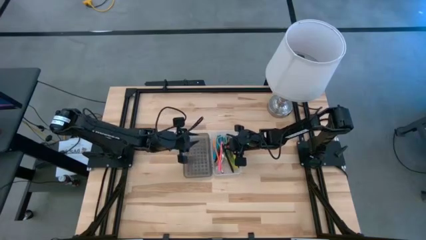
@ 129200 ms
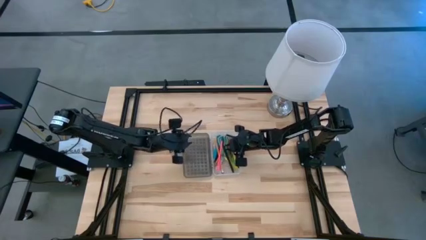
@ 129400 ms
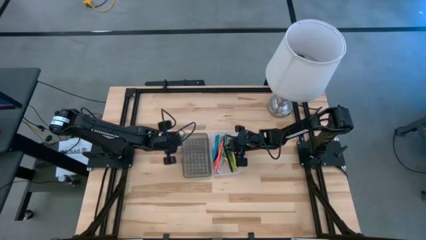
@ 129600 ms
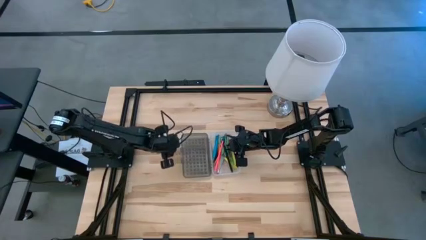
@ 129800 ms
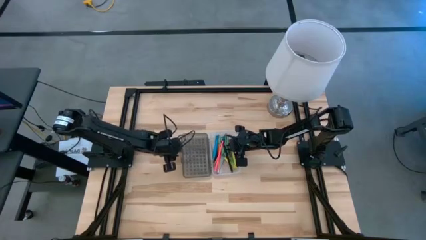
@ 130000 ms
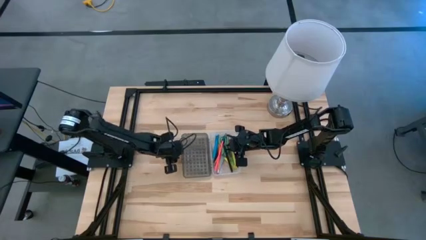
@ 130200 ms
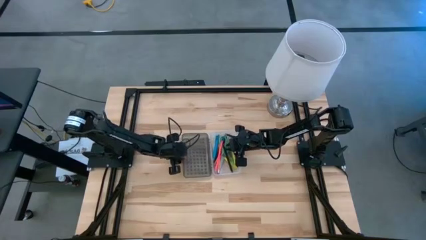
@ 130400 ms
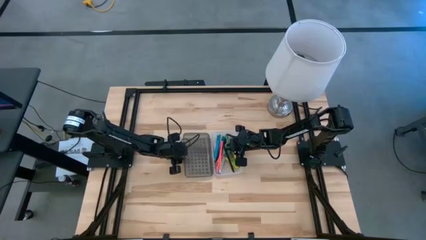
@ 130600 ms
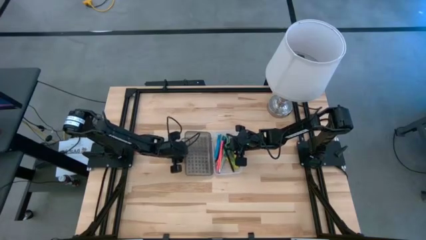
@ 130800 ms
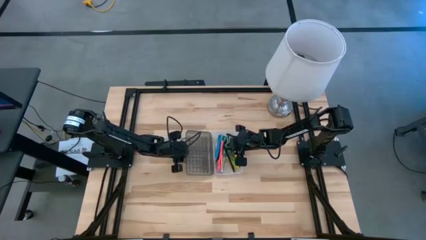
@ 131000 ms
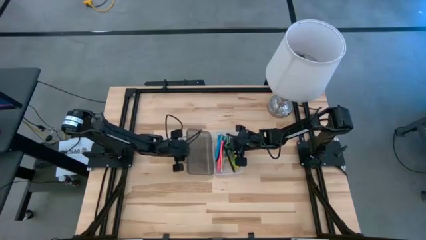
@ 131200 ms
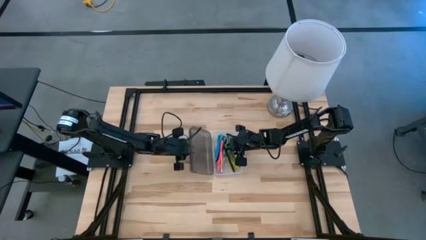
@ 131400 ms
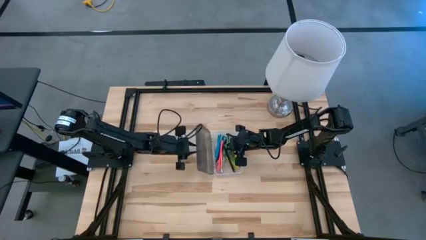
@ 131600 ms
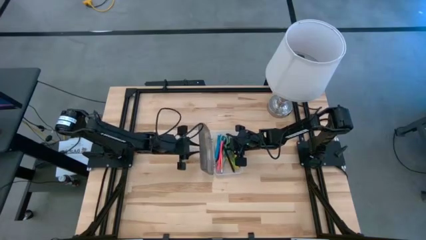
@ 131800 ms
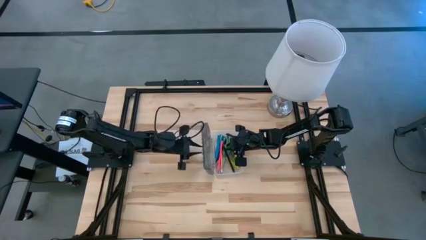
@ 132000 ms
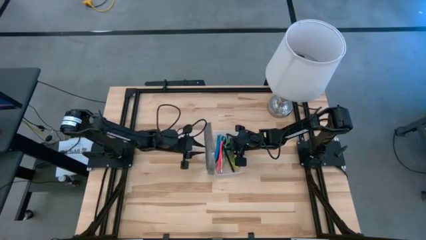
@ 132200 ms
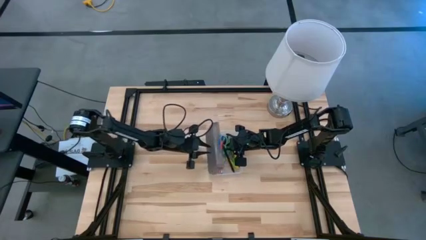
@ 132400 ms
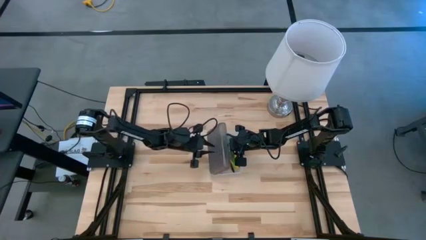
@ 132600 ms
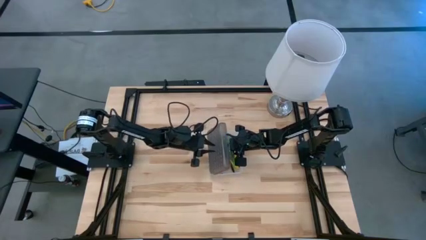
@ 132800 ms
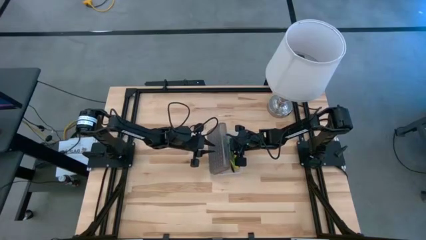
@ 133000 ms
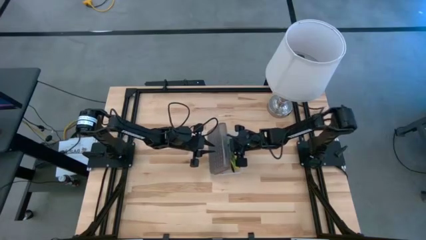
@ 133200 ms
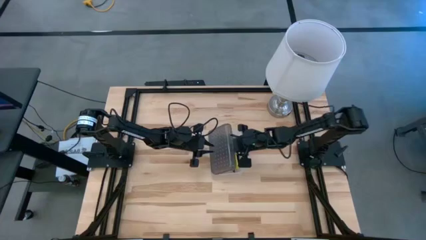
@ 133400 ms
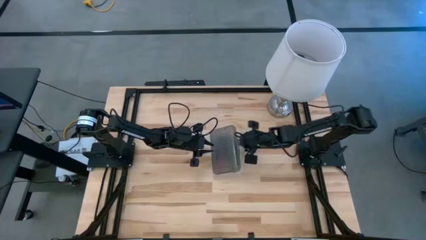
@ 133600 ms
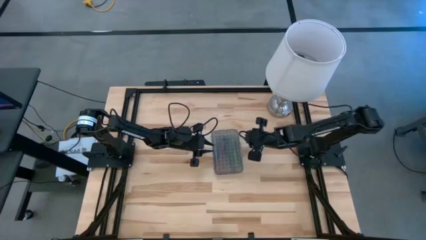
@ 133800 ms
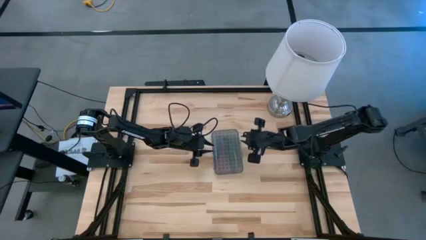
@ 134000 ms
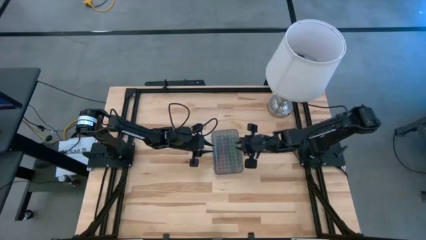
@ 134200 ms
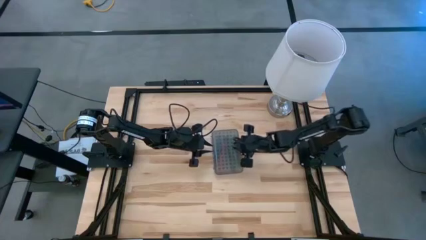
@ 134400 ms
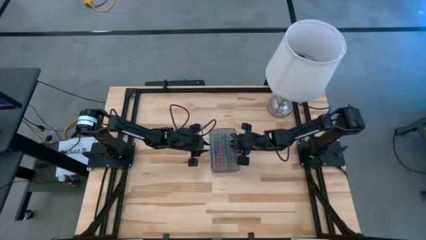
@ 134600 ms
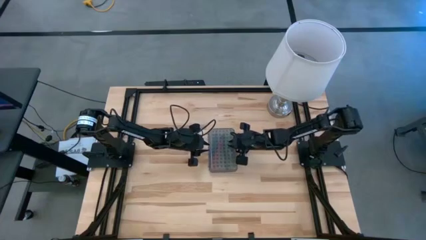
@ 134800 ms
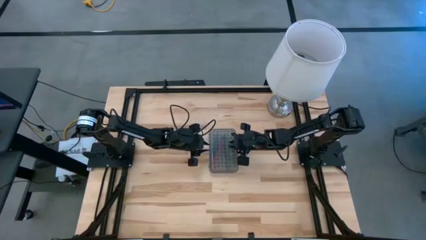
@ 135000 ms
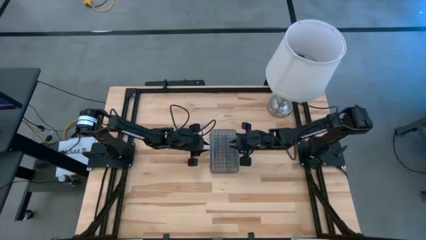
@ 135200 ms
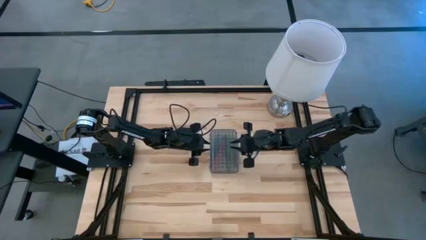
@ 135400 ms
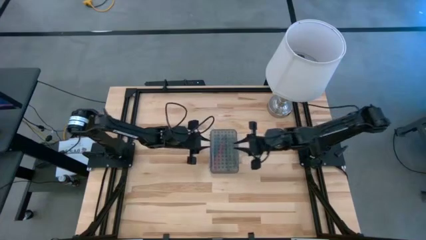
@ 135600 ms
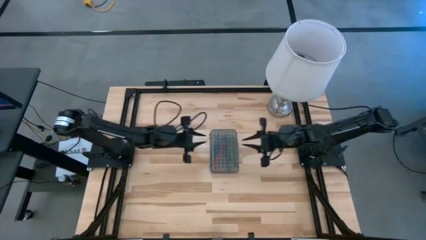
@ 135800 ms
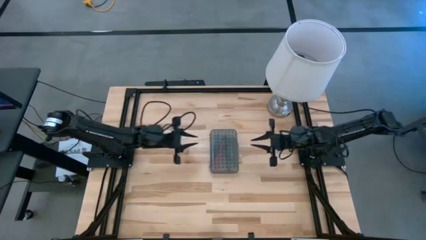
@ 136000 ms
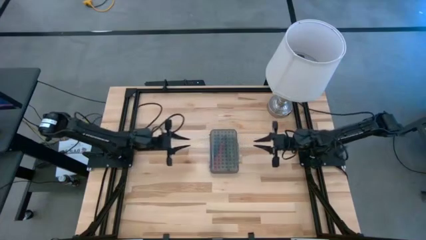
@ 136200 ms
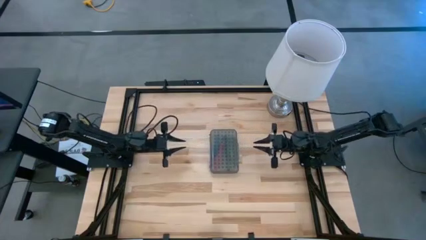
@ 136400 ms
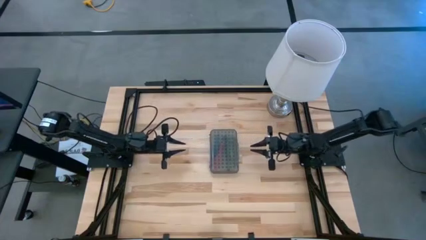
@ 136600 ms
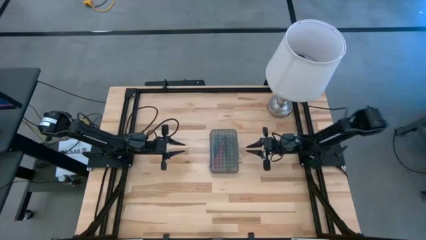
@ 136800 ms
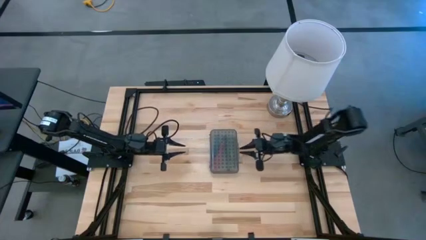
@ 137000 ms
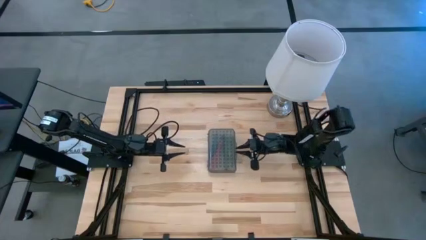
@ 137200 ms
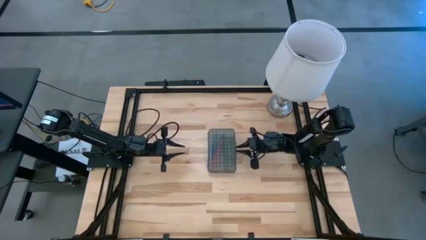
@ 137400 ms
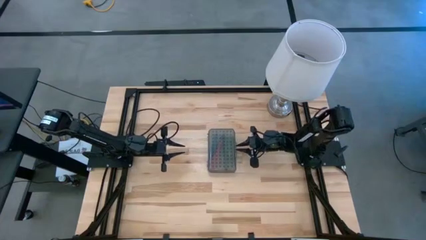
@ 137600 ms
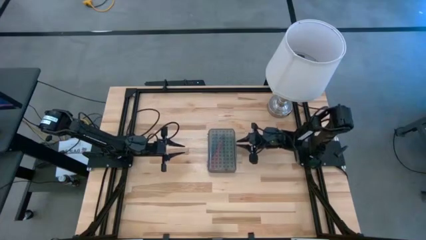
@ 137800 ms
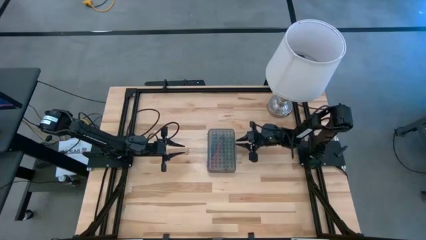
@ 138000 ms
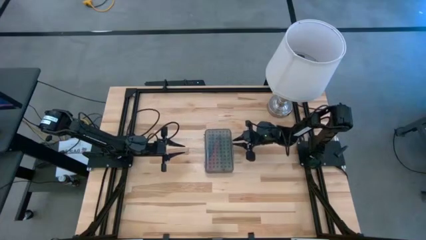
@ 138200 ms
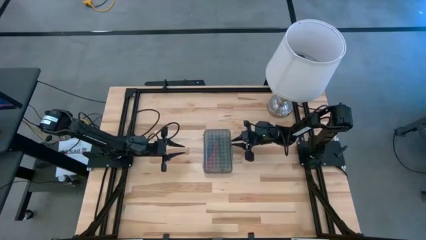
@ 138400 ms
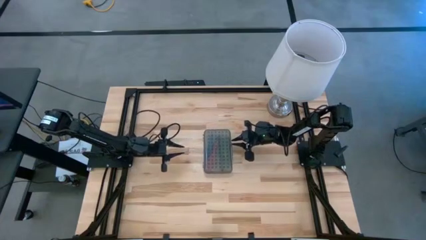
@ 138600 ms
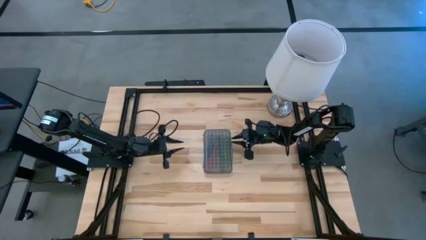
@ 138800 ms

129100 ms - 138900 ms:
Task: Pick & place school supplies into a supply box
Close the supply box

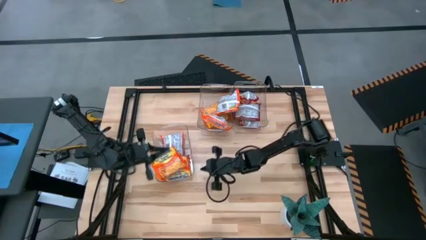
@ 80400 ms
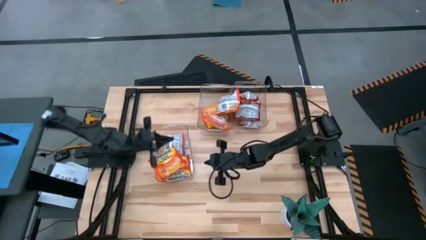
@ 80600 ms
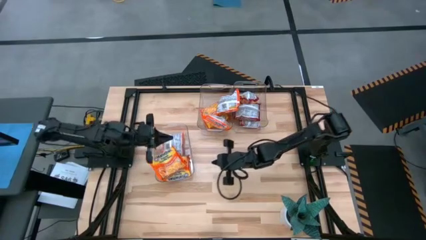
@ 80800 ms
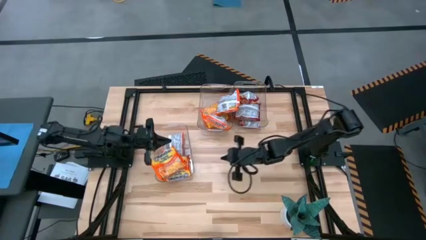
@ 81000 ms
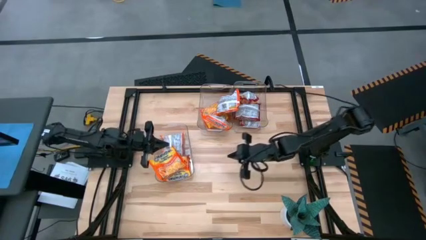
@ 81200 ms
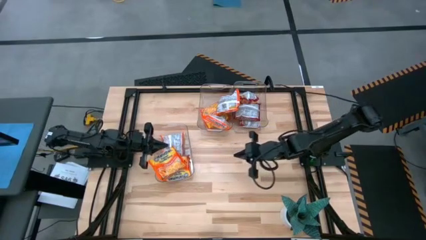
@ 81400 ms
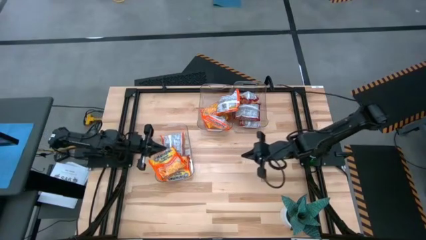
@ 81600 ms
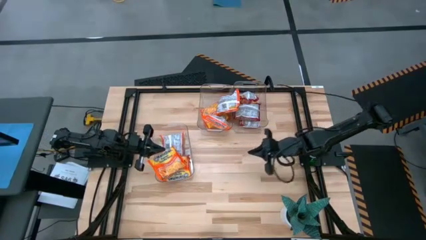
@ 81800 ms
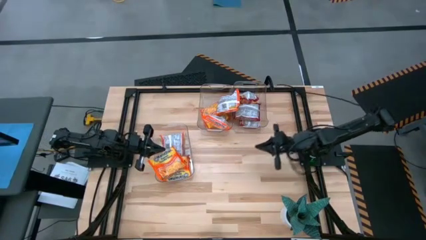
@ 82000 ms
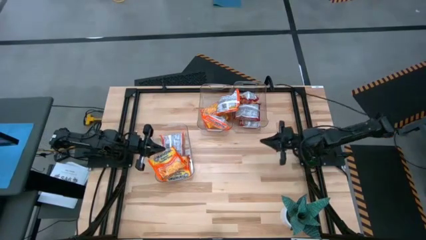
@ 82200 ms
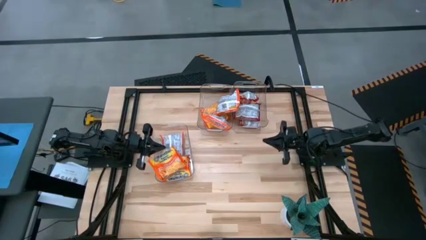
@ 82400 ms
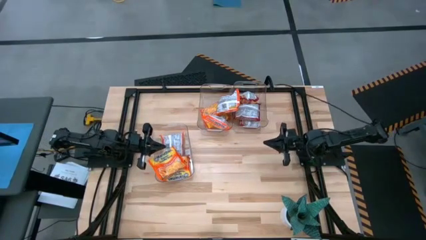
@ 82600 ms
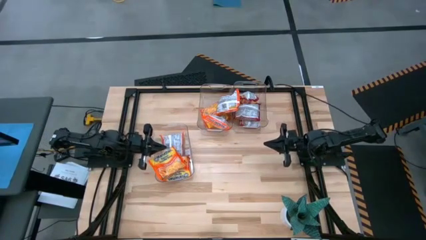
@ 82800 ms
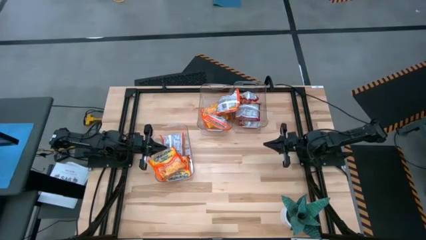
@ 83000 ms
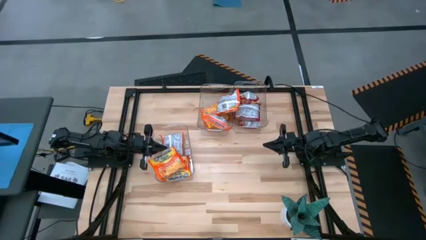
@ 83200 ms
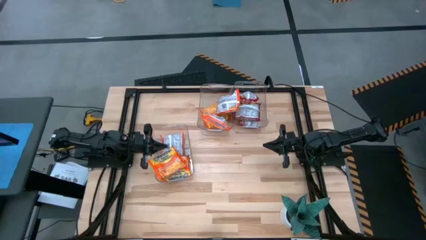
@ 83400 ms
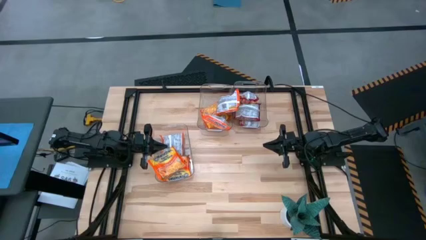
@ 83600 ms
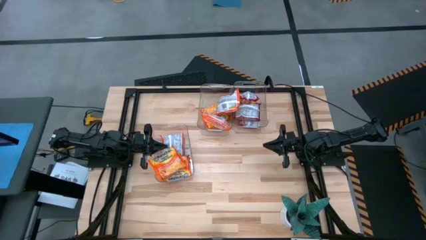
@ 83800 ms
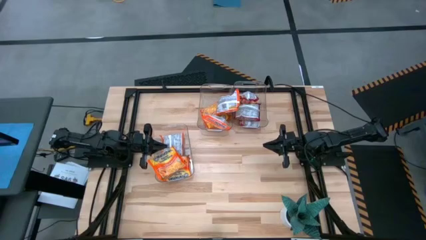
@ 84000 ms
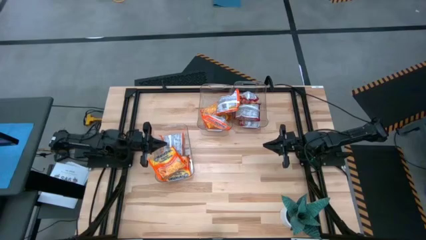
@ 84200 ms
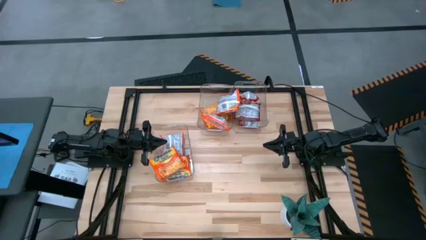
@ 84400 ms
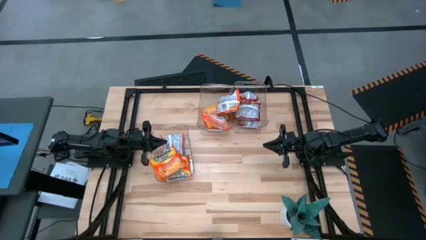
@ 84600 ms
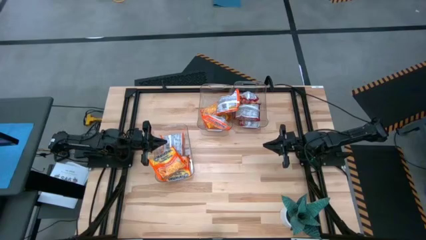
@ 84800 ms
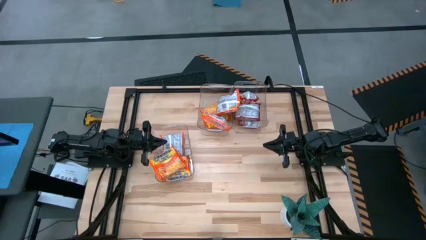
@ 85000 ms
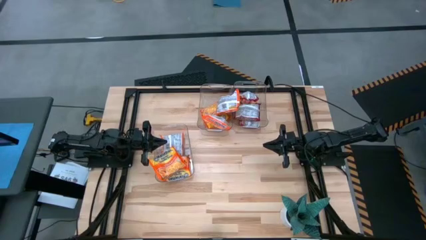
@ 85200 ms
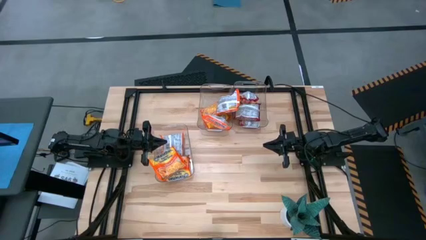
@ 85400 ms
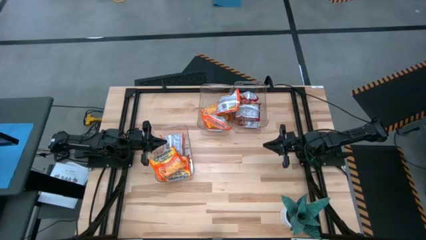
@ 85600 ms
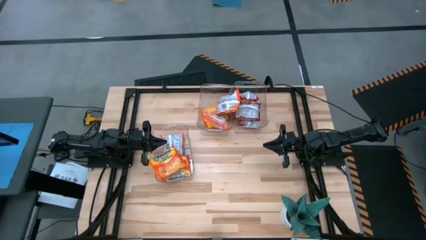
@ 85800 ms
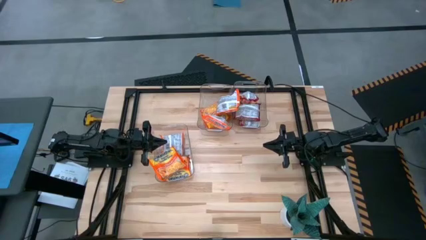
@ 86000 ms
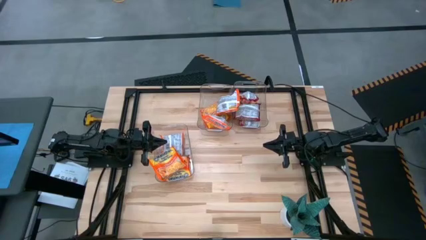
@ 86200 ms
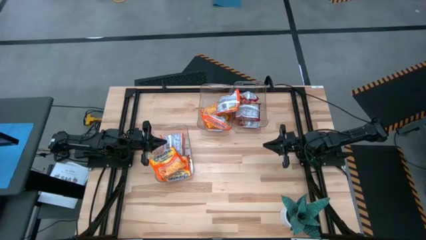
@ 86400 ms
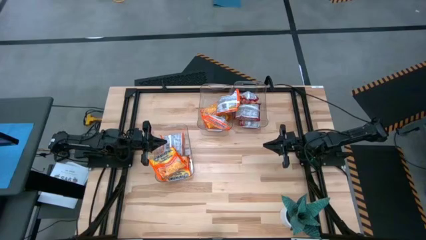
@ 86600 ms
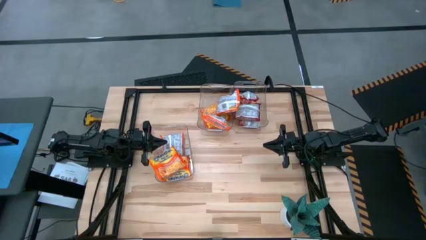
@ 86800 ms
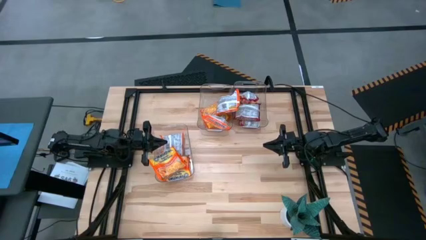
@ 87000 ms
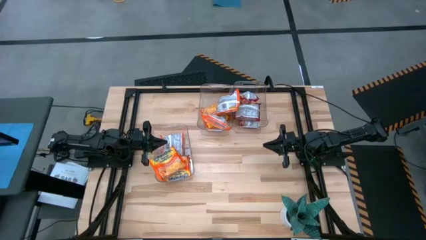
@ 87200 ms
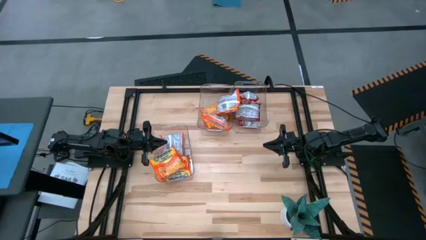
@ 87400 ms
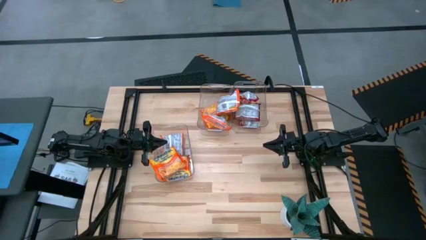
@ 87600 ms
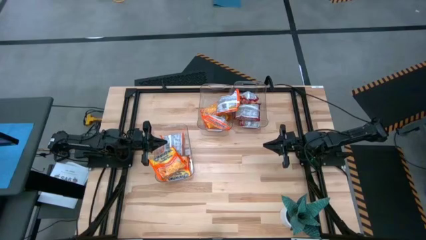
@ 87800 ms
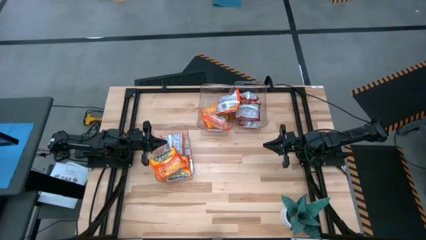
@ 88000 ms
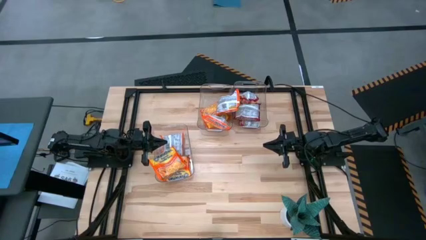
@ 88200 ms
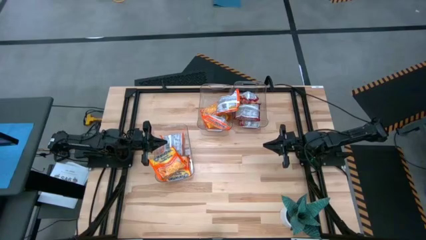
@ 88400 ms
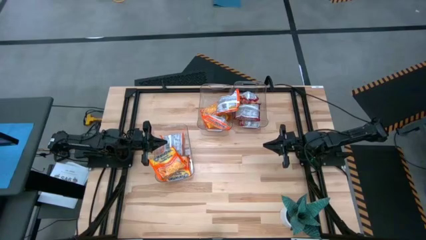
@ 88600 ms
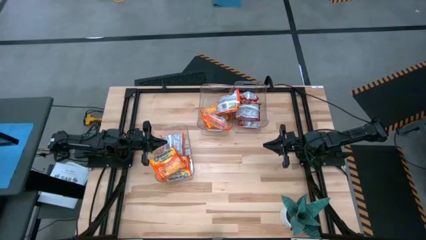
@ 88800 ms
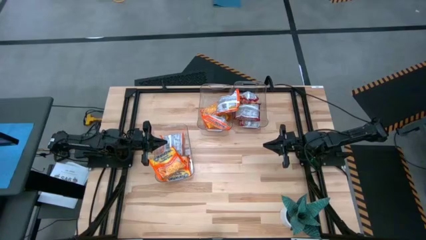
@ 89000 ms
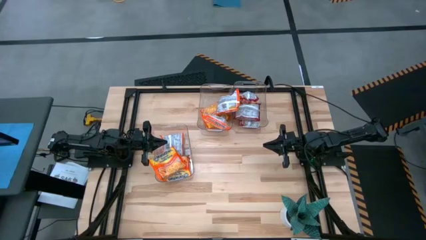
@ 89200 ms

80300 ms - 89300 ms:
Task: Sort Maruchan noodles
Return to Home Position
